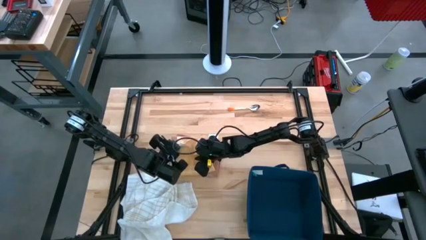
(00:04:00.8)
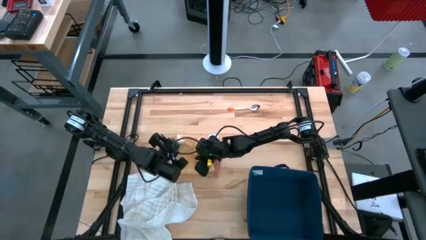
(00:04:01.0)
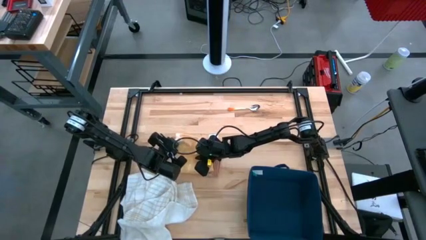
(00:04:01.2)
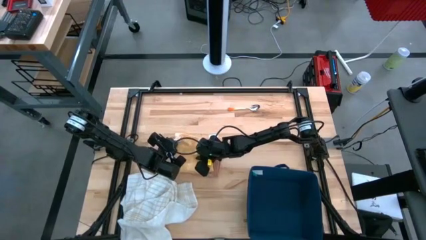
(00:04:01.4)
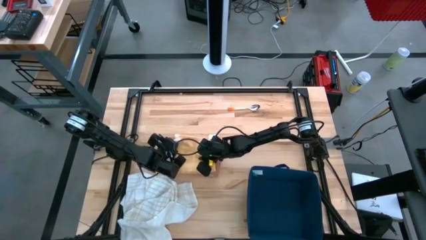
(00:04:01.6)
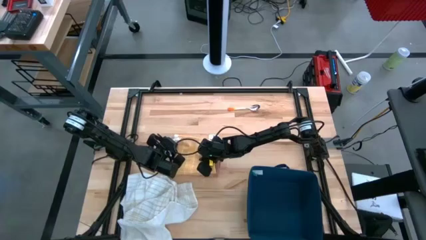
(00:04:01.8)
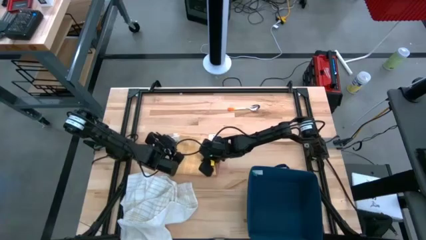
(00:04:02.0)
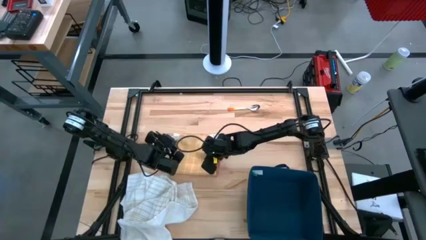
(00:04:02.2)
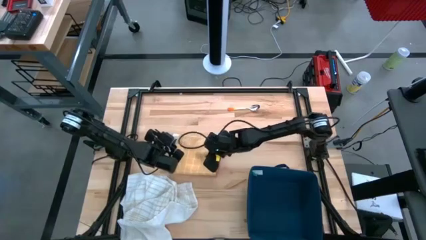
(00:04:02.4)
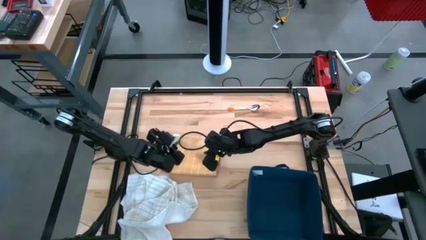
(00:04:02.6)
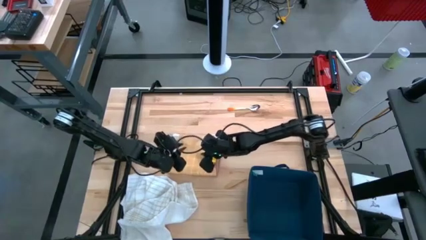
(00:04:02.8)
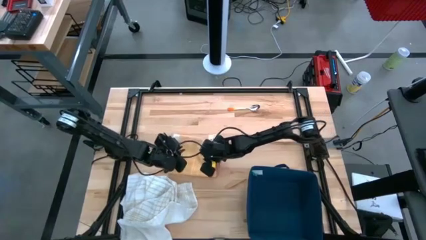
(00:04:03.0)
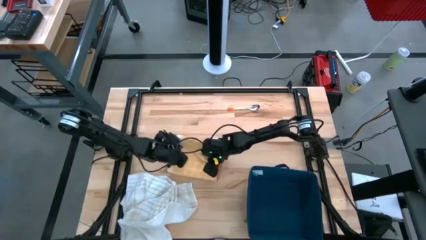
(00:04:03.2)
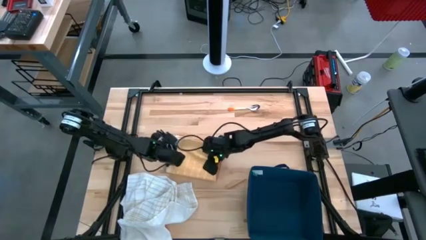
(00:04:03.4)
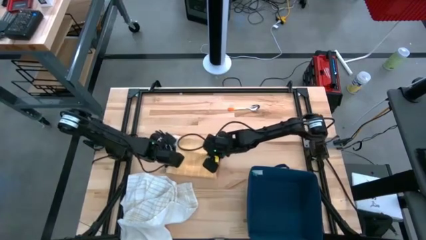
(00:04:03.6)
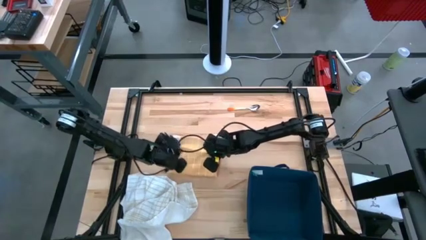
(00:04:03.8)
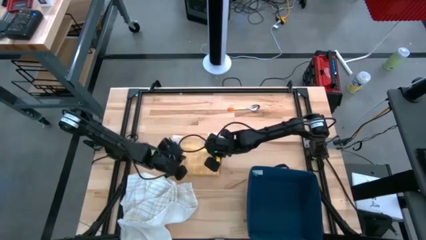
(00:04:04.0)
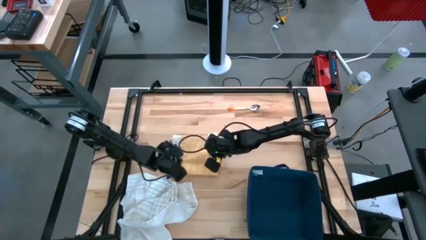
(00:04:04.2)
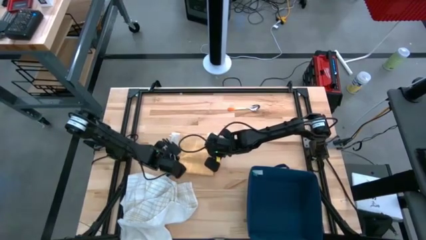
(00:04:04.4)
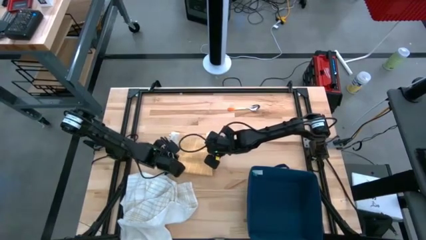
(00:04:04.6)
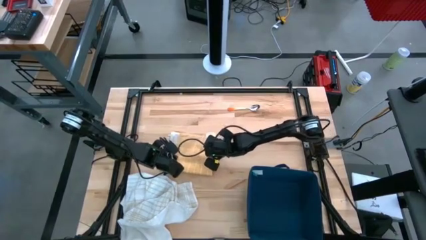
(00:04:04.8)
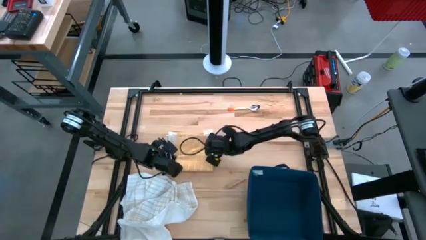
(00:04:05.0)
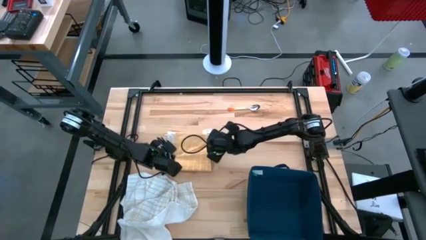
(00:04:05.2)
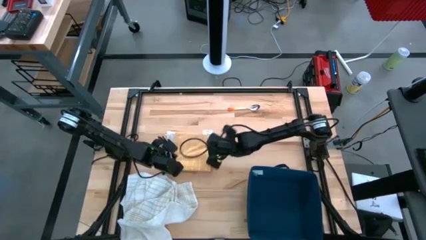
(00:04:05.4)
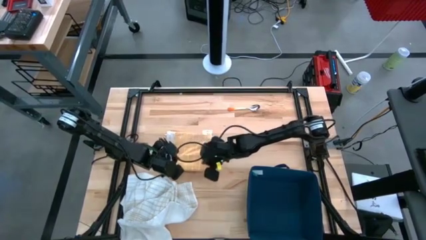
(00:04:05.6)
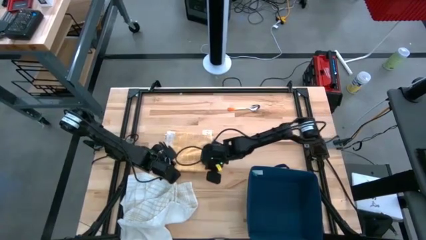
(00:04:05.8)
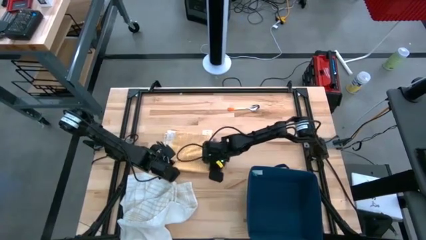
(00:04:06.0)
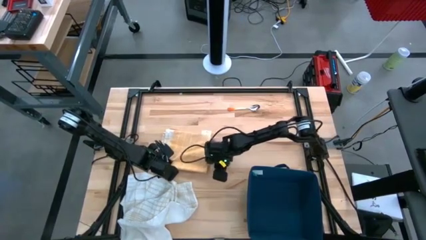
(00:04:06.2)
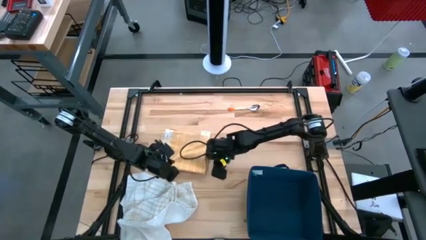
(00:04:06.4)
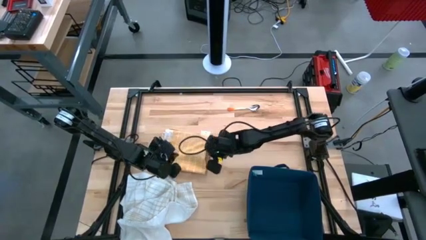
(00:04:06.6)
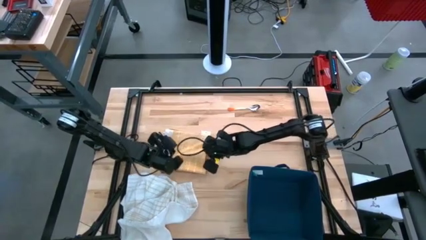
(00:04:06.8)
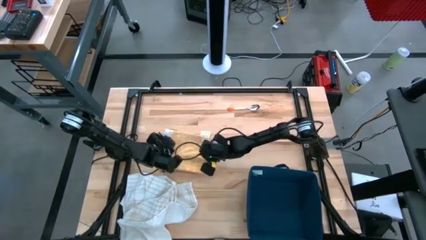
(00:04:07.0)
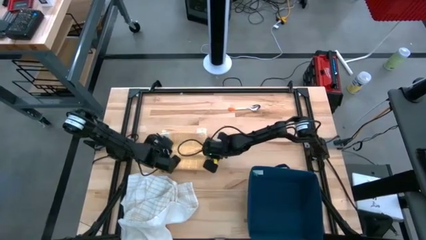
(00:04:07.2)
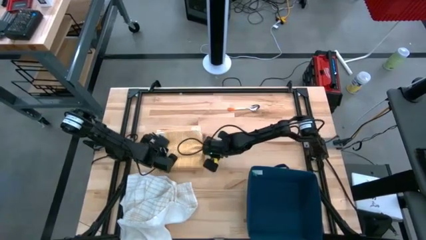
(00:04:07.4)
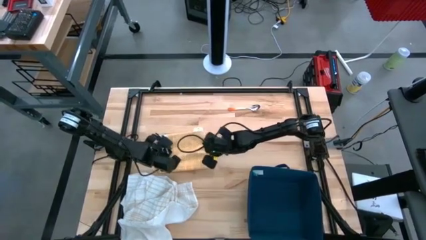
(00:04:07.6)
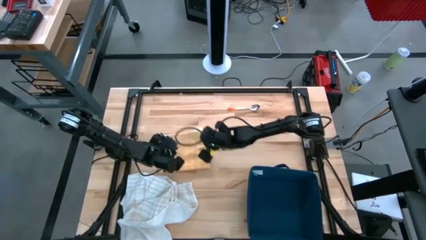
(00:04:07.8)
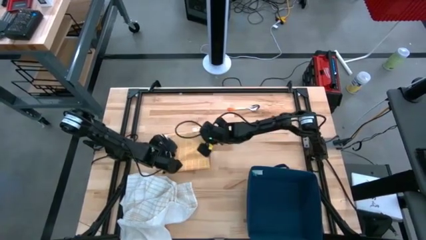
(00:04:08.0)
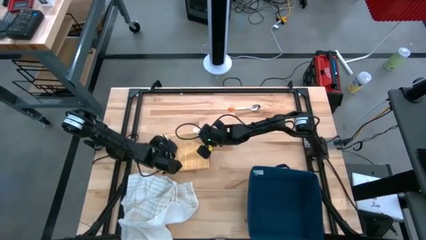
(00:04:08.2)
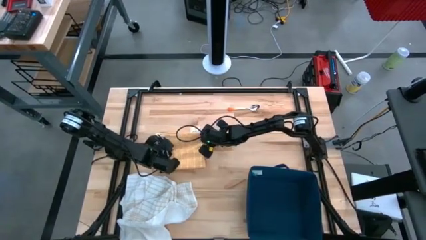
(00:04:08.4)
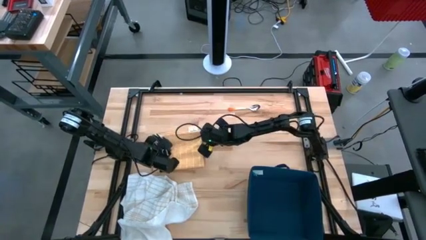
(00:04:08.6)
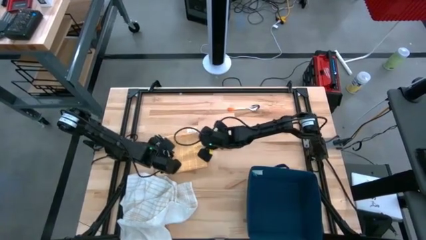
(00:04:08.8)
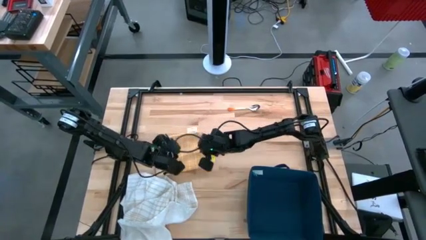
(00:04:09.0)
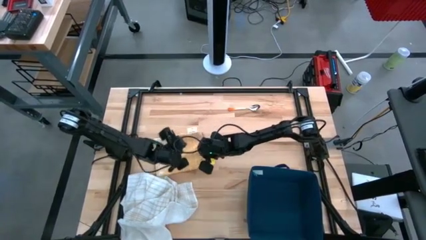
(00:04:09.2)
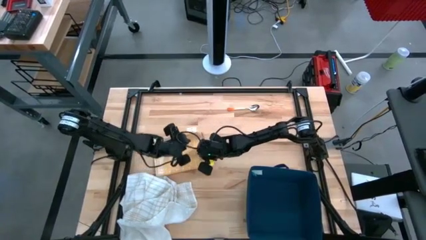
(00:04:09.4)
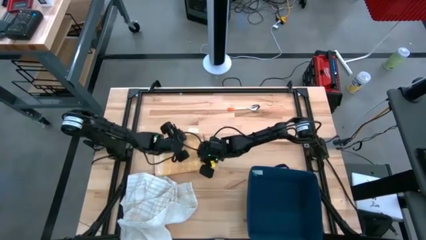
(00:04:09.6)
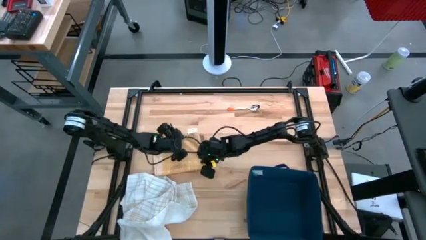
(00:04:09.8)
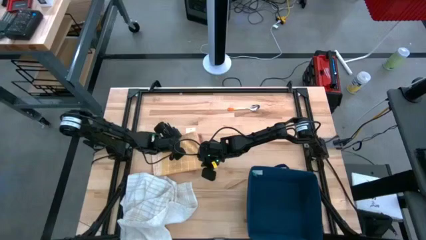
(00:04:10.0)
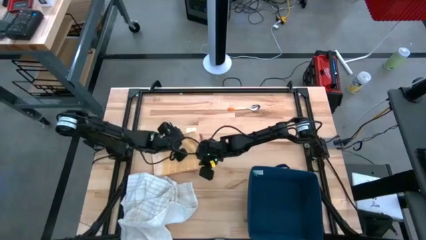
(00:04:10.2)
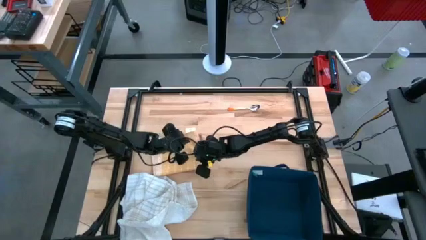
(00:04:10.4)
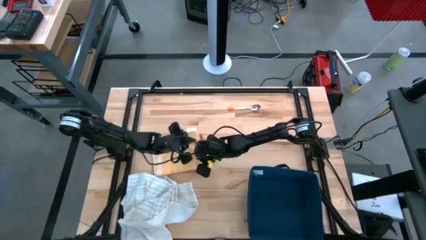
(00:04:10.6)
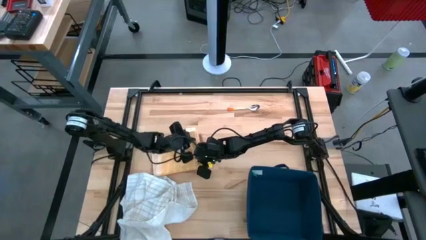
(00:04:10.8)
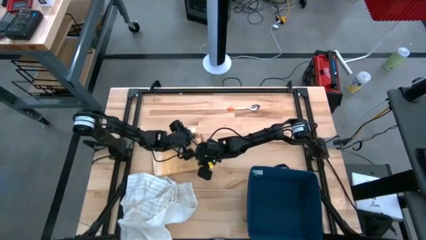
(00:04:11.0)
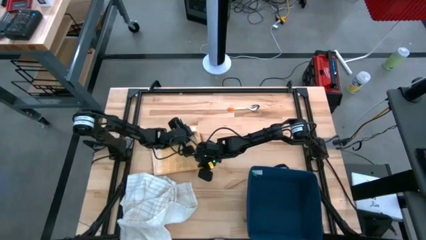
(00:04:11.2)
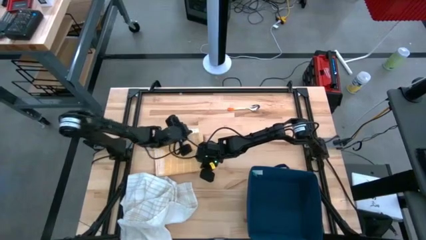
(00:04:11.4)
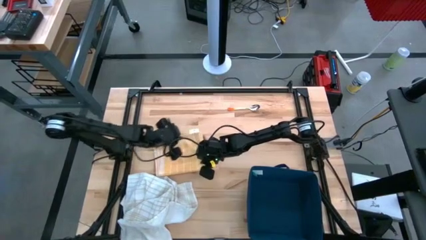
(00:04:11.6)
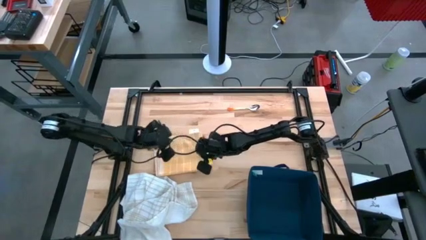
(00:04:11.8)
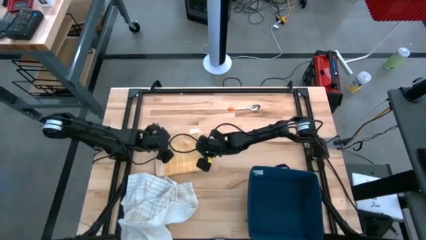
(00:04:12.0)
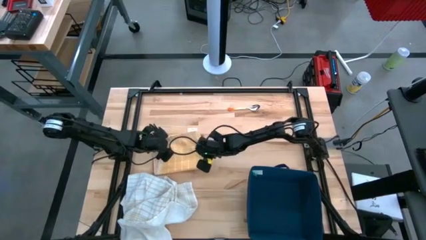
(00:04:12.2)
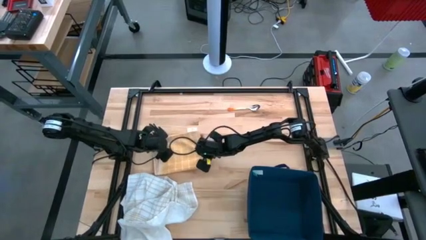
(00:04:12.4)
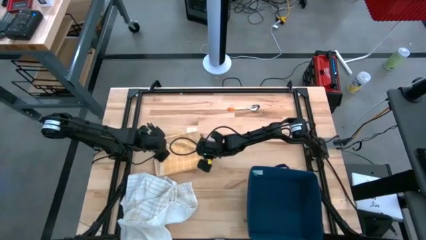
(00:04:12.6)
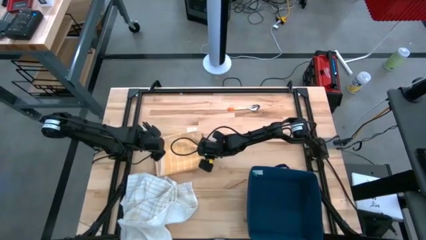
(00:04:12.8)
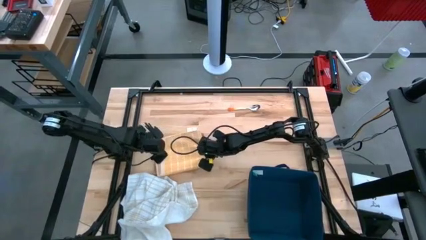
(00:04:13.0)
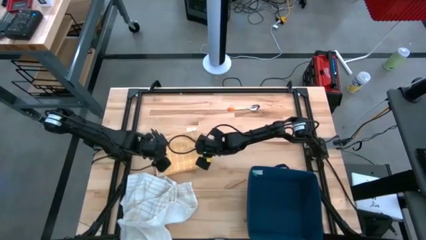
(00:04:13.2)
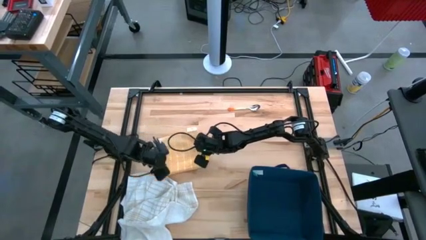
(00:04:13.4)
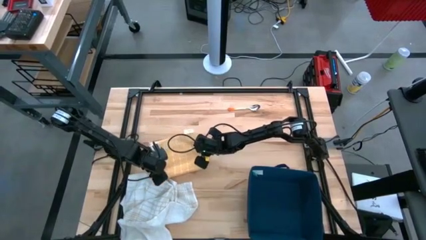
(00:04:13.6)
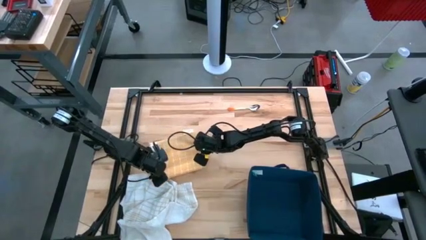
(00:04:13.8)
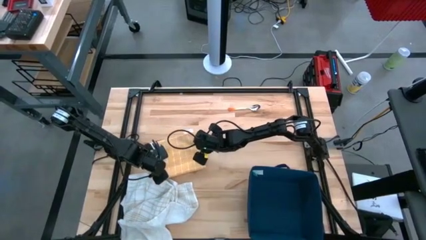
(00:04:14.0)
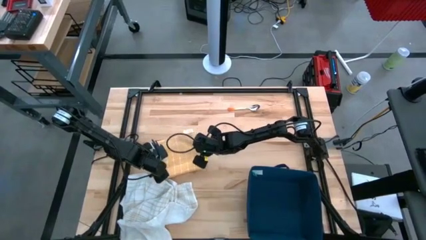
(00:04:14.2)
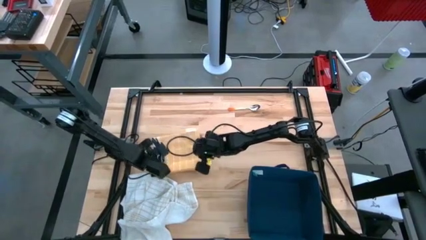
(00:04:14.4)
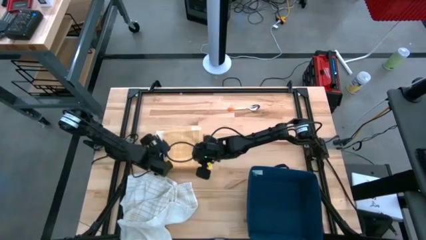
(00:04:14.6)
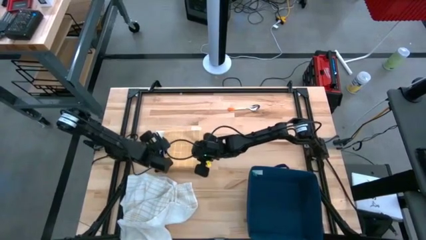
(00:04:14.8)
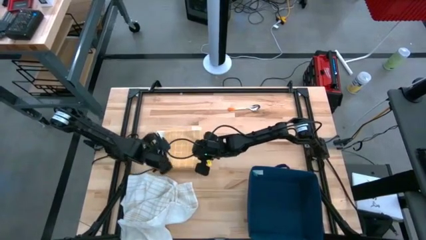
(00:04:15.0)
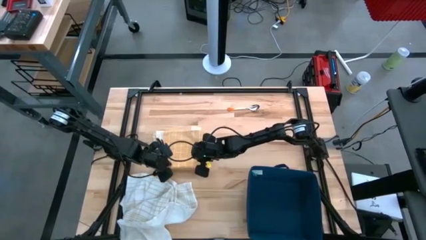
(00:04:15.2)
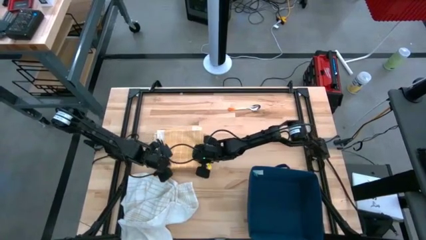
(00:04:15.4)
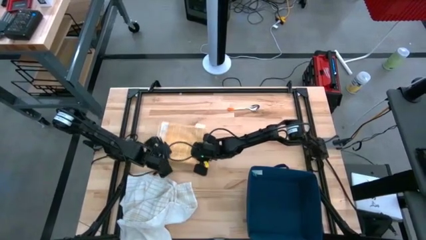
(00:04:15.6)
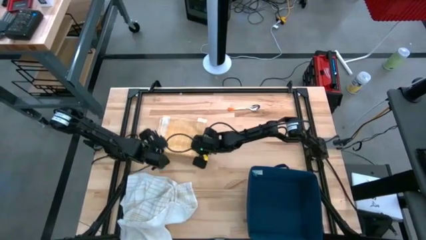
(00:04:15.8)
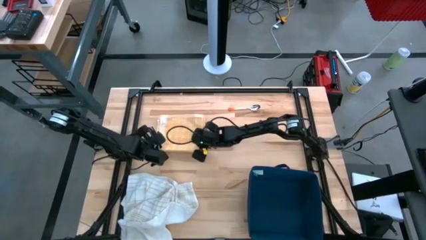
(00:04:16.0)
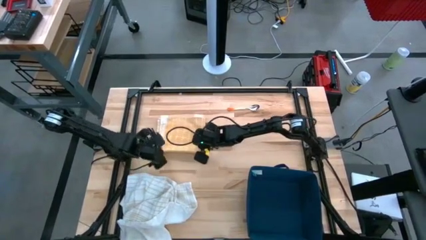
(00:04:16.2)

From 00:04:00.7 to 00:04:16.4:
Task: Fold towel
Stack the folded yellow towel on top of the folded brown towel
